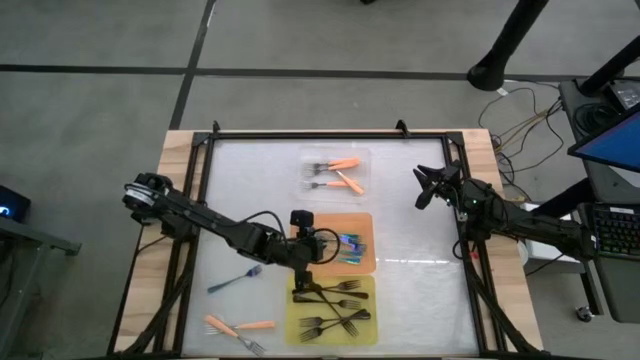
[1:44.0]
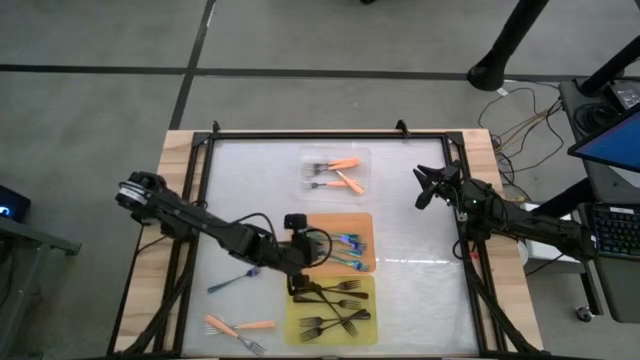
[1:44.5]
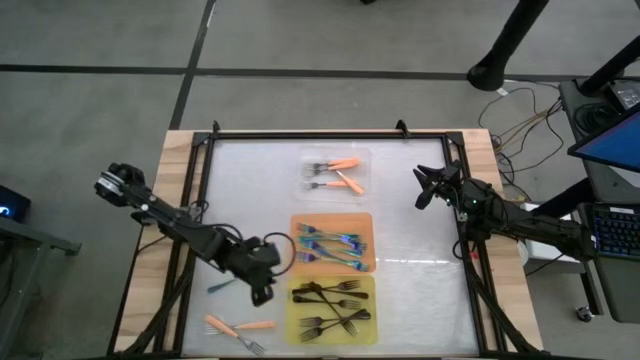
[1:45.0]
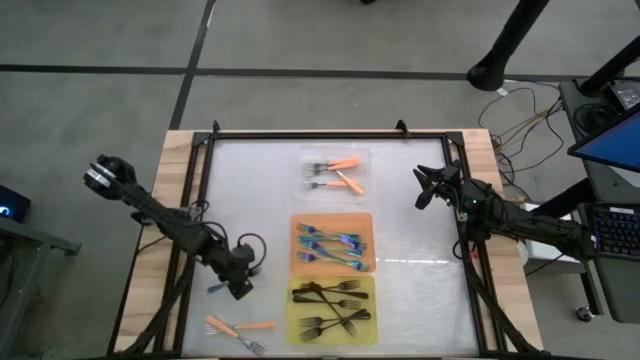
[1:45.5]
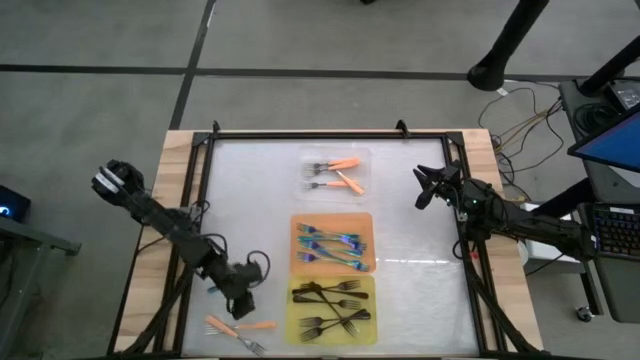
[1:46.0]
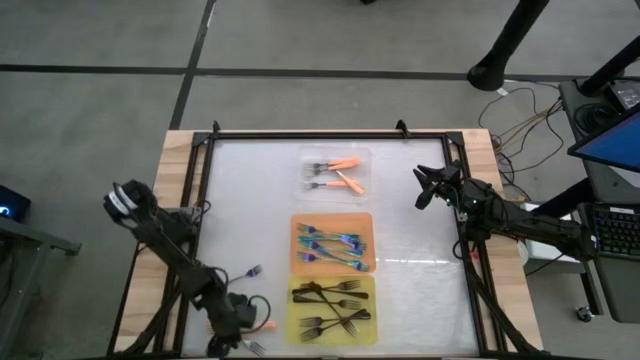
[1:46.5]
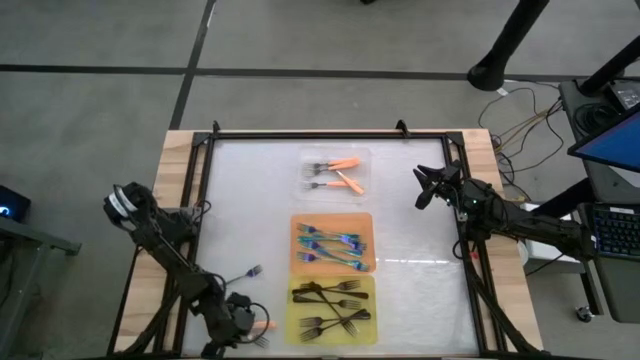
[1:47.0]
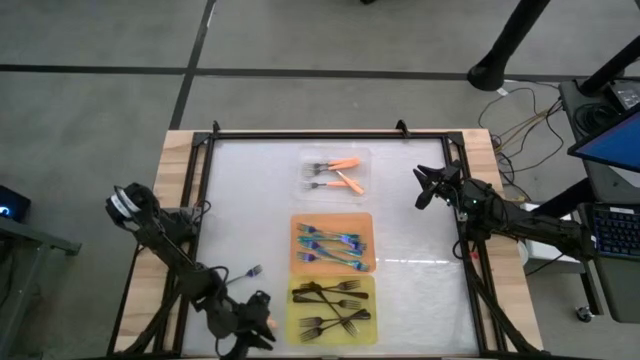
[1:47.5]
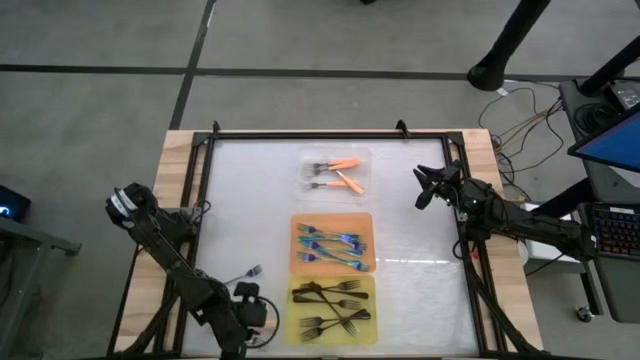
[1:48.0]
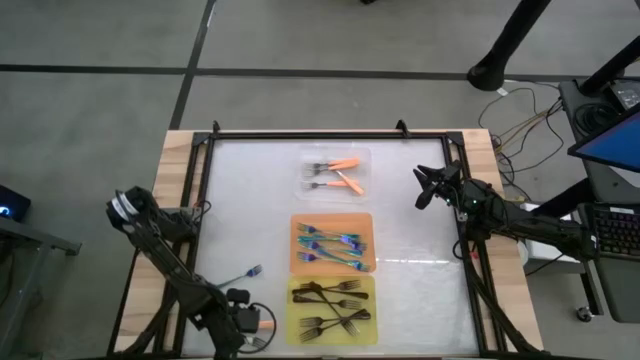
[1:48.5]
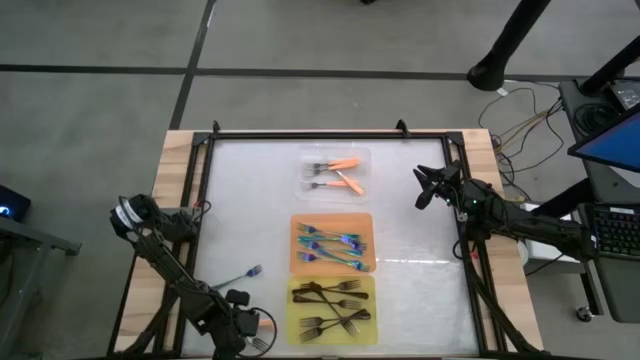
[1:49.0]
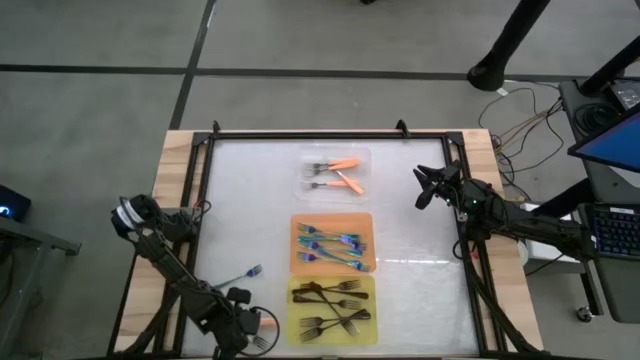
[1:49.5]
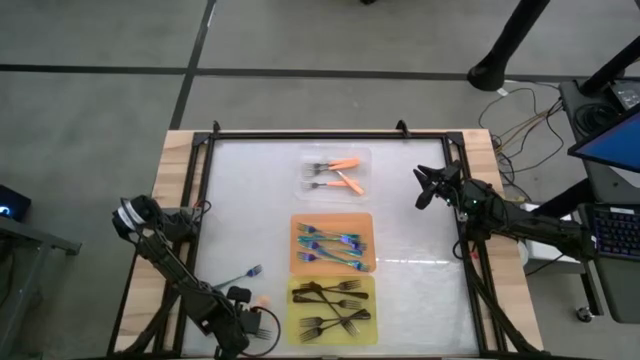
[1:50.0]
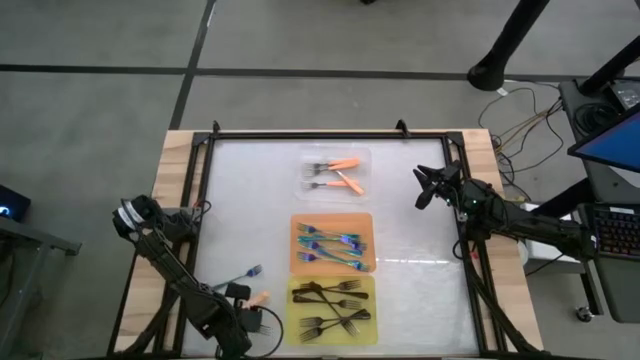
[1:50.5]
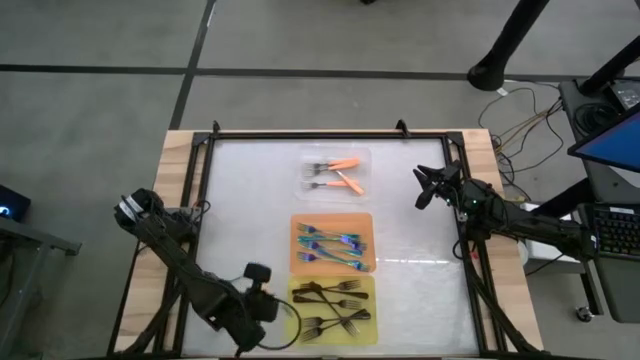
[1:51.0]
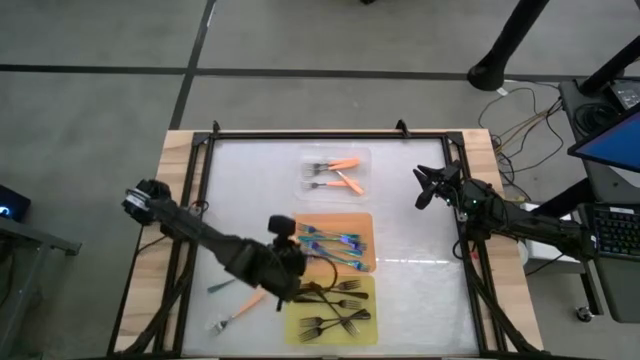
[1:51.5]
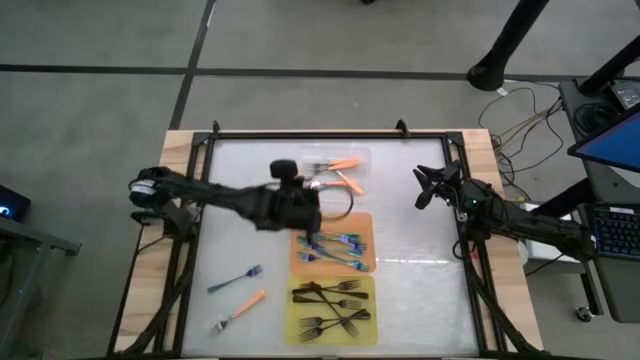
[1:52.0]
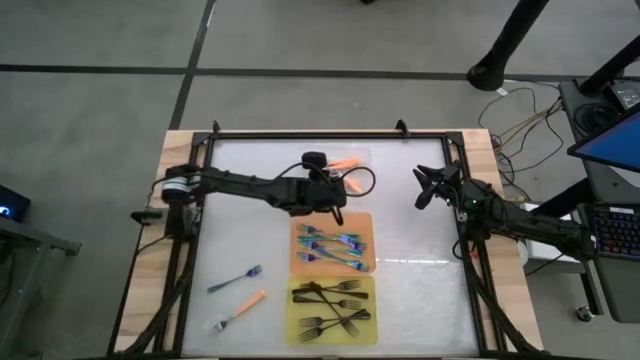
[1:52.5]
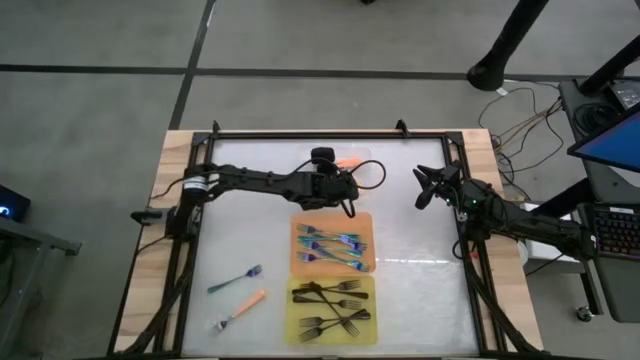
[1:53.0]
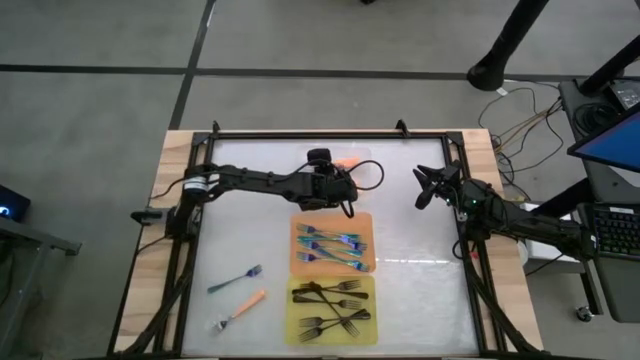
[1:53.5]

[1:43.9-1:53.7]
Task: Sort silverware by color (type)
Put the orange fork into the white bin

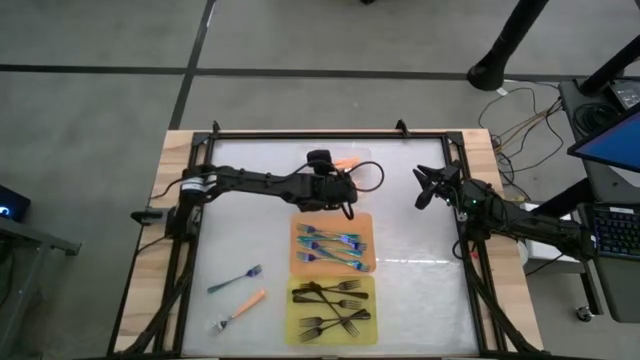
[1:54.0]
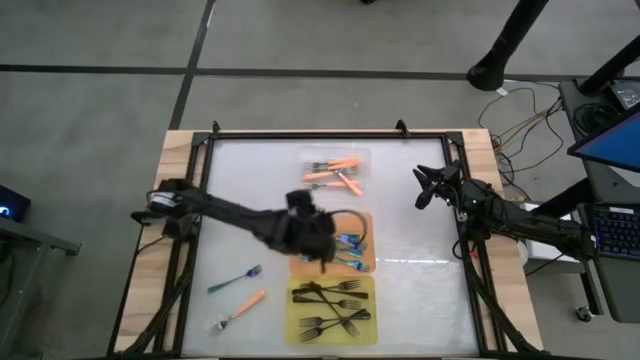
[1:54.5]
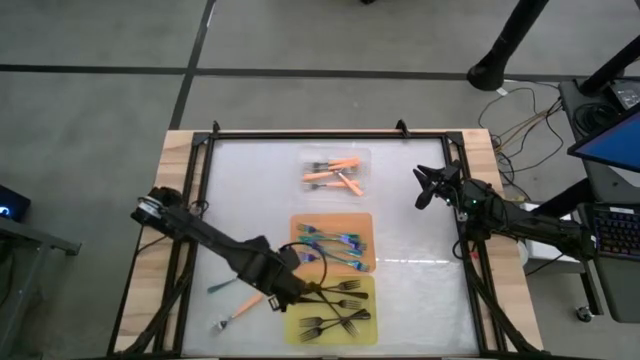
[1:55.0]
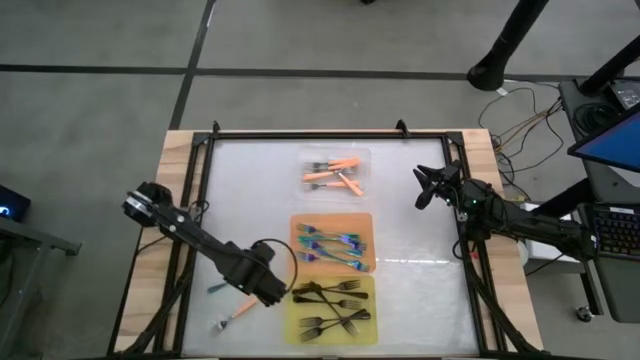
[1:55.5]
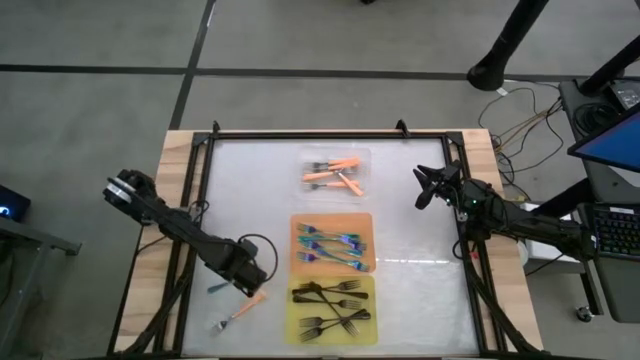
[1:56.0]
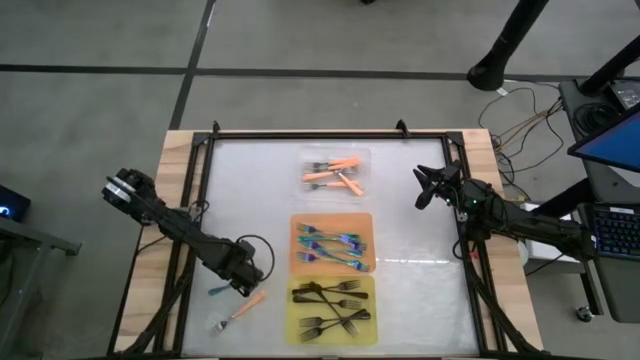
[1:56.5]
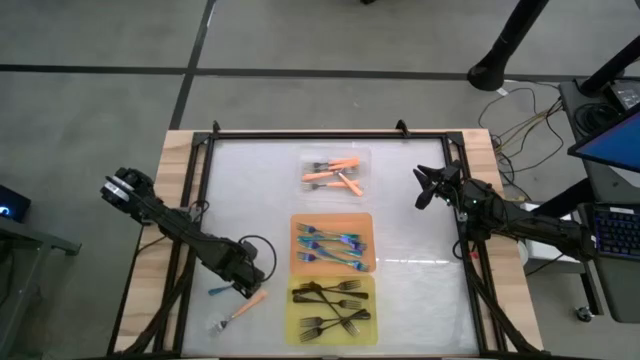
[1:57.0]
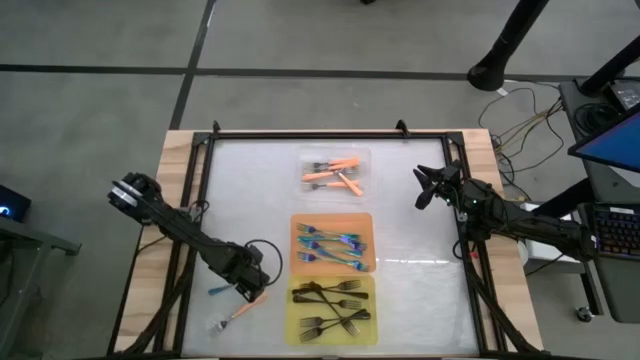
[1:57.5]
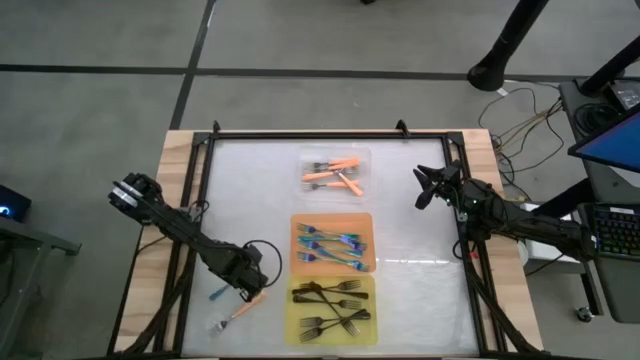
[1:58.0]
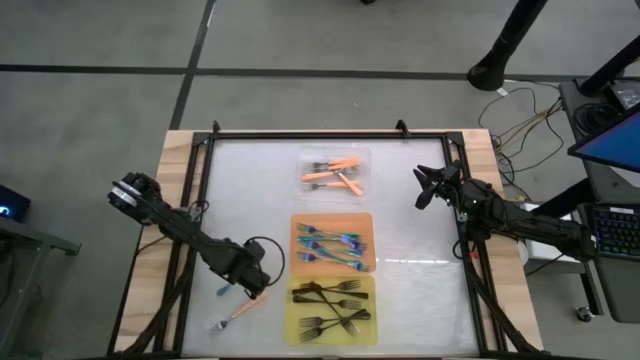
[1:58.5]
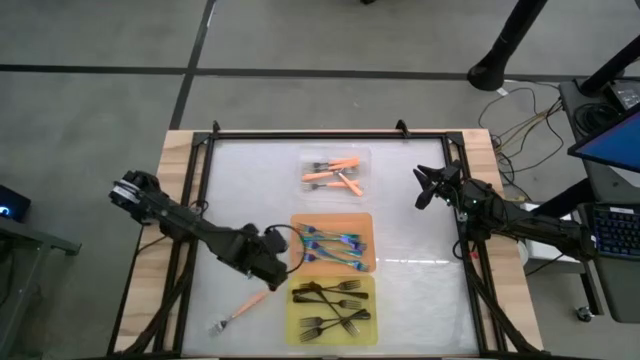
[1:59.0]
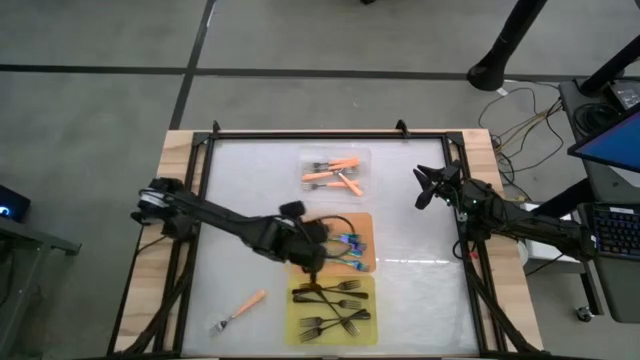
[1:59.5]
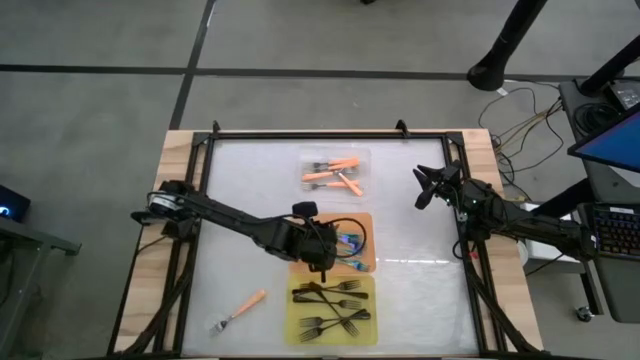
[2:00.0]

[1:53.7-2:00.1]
Put the blue fork into the orange bin

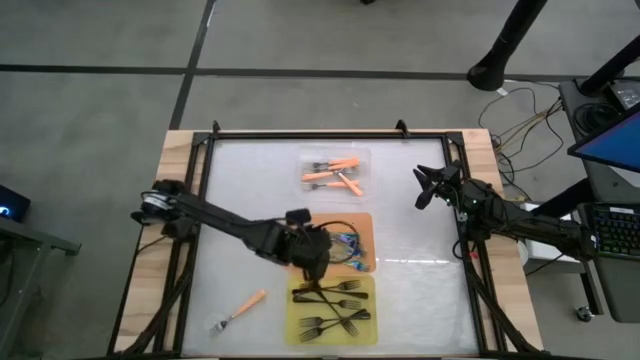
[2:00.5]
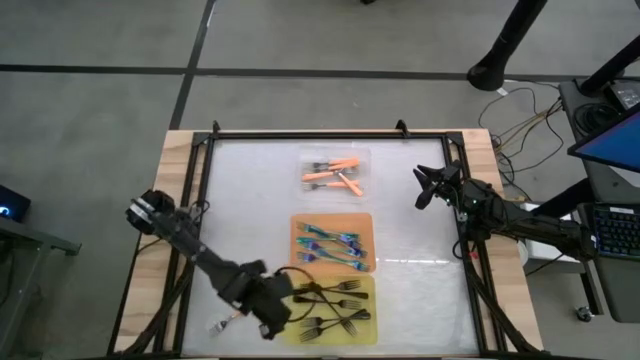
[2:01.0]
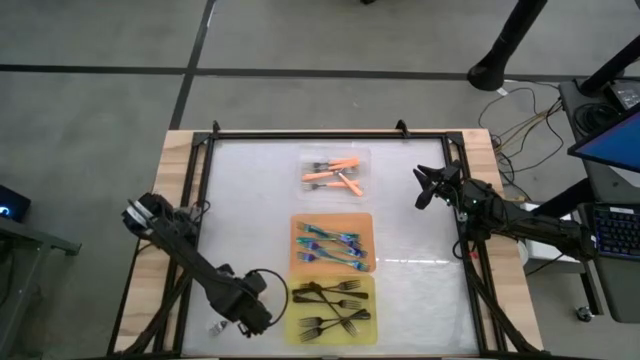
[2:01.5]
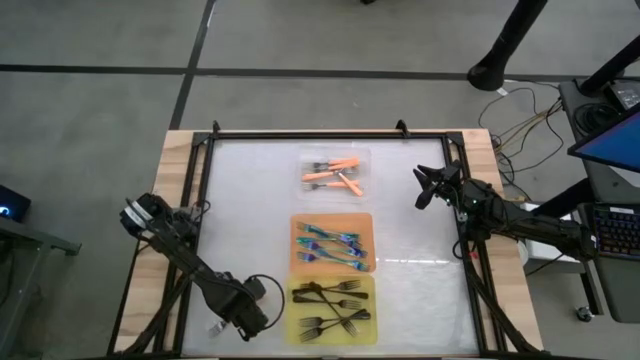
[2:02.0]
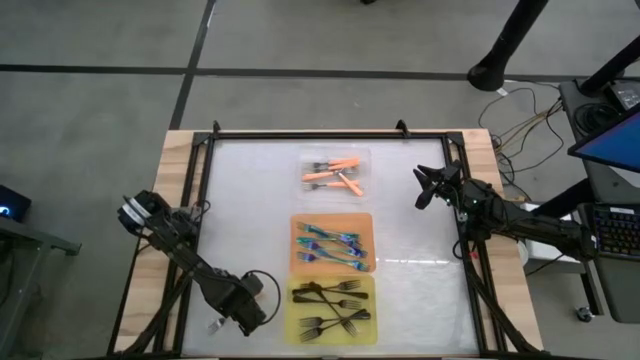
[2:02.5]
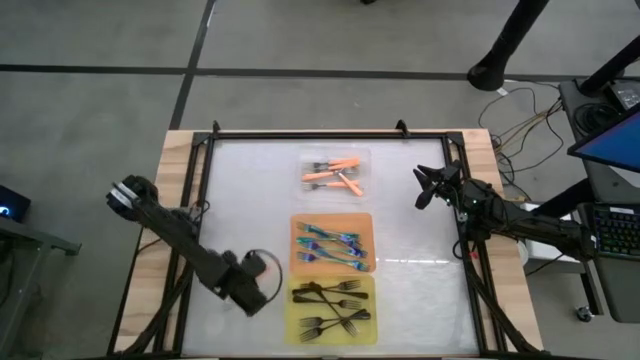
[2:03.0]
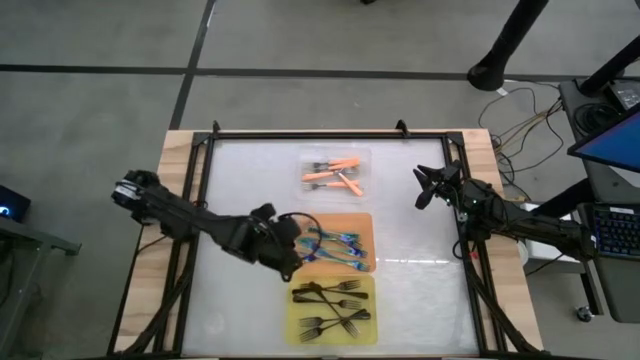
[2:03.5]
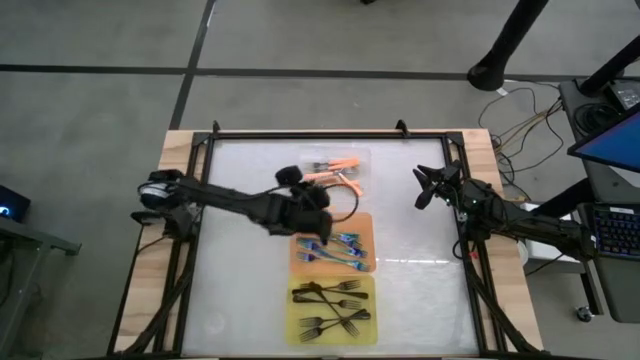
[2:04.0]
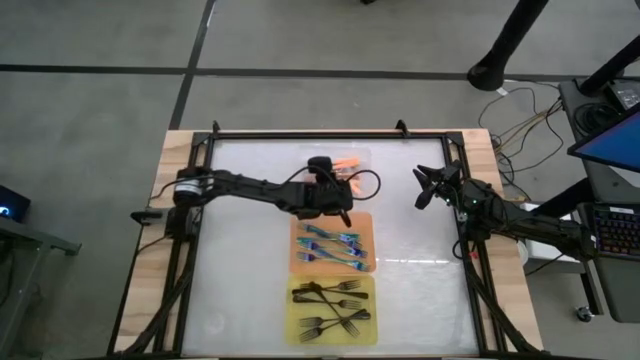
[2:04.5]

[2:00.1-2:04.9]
Put the orange fork into the white bin

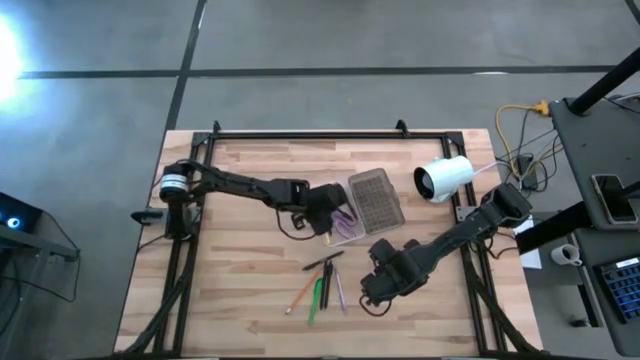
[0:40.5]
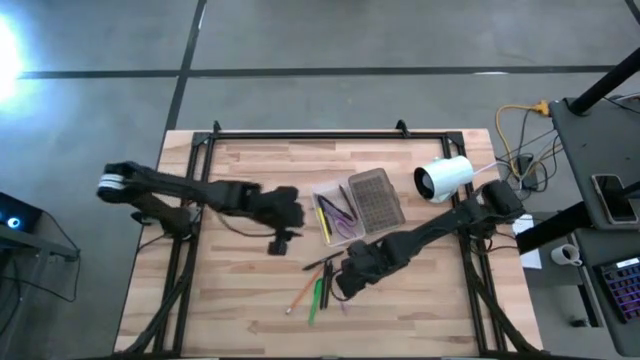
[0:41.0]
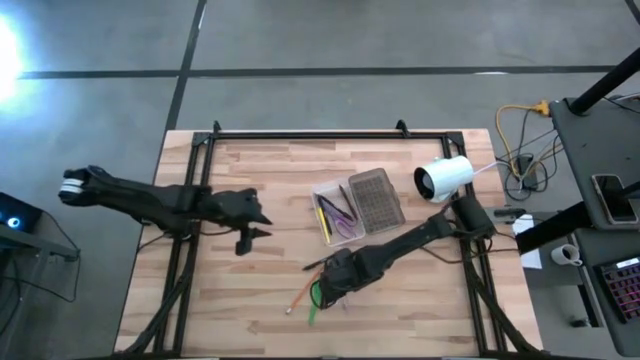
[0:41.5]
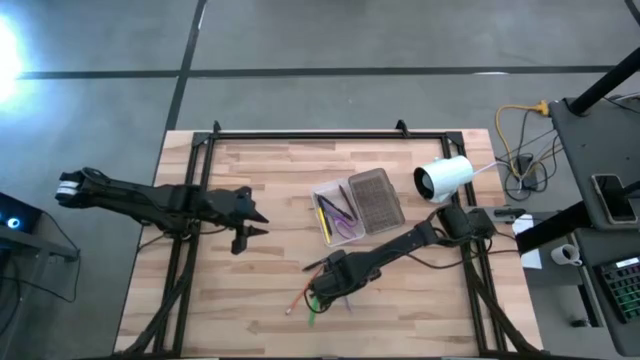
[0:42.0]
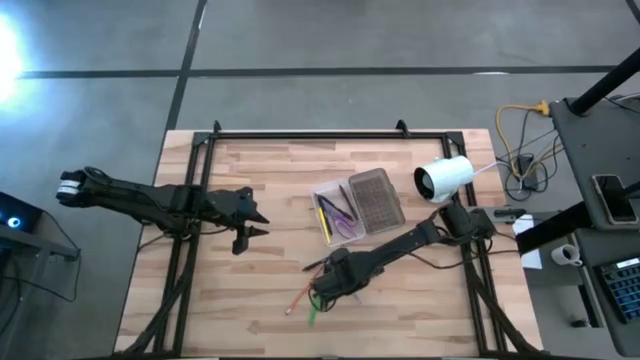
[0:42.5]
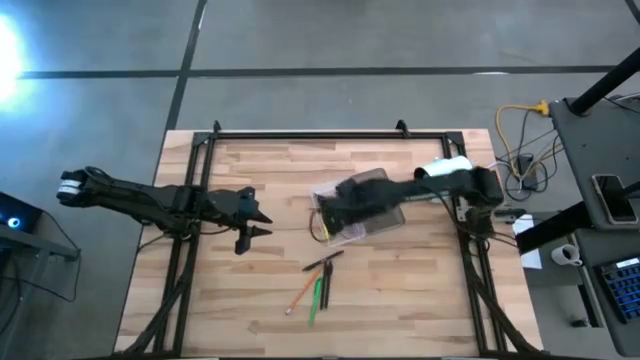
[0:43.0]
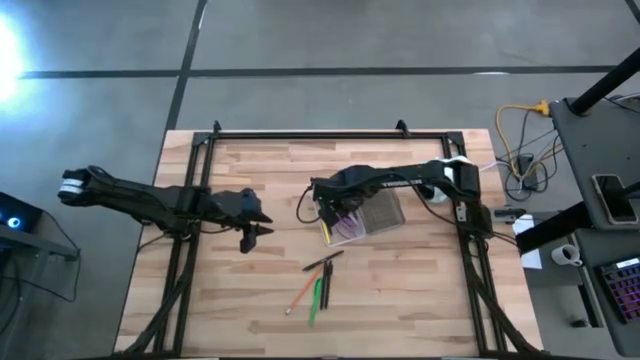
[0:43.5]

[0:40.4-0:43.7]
Task: Pick & place school supplies into a supply box
Put the purple pen into the supply box
